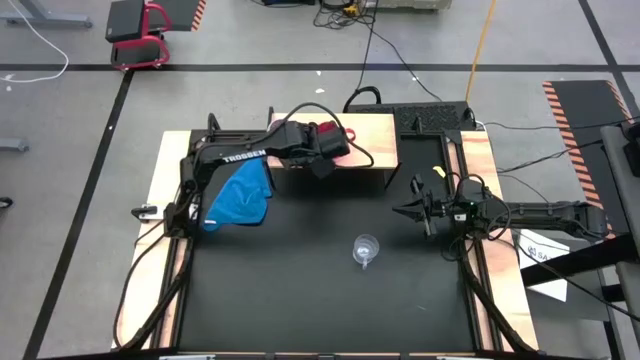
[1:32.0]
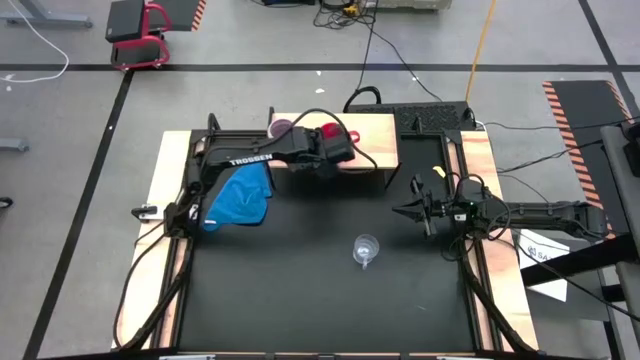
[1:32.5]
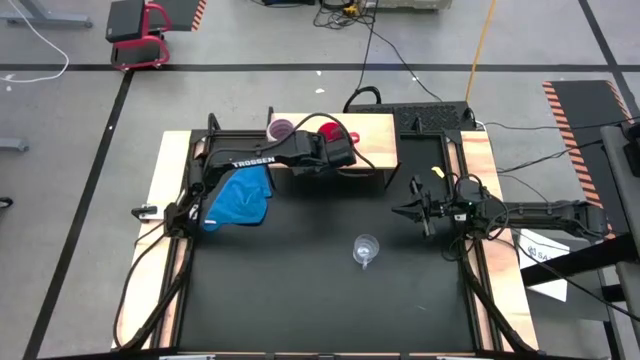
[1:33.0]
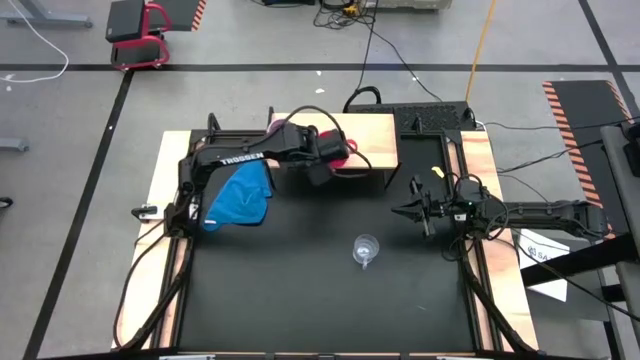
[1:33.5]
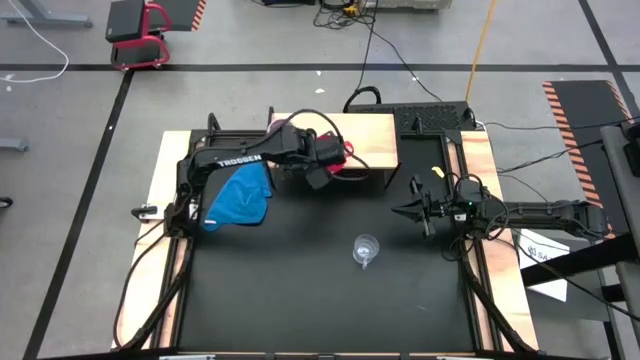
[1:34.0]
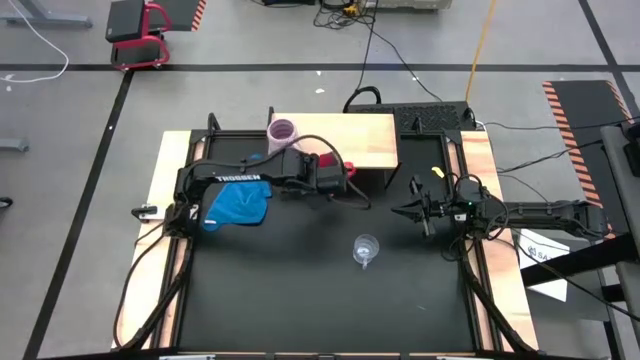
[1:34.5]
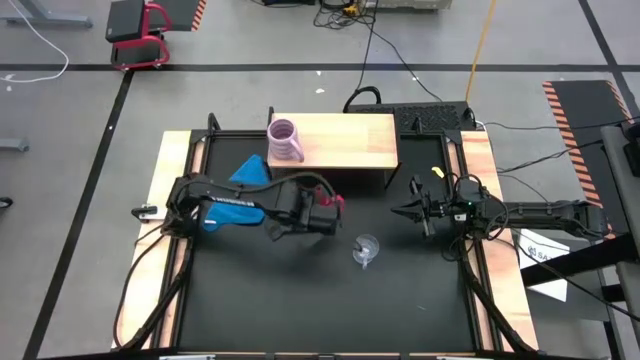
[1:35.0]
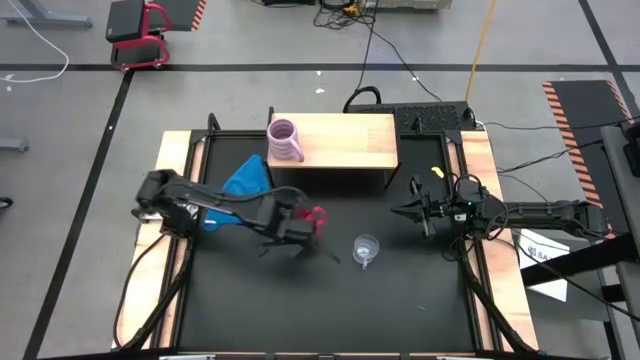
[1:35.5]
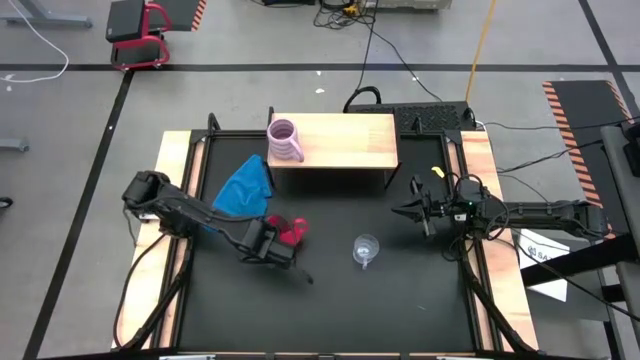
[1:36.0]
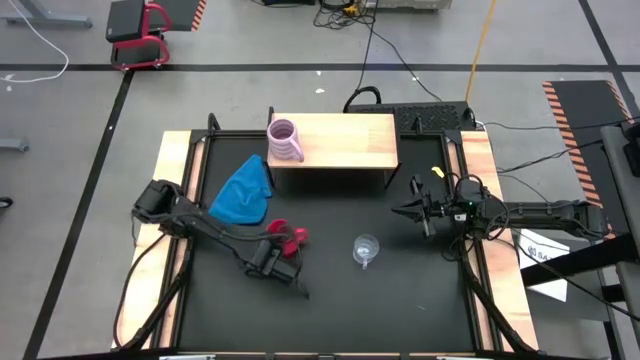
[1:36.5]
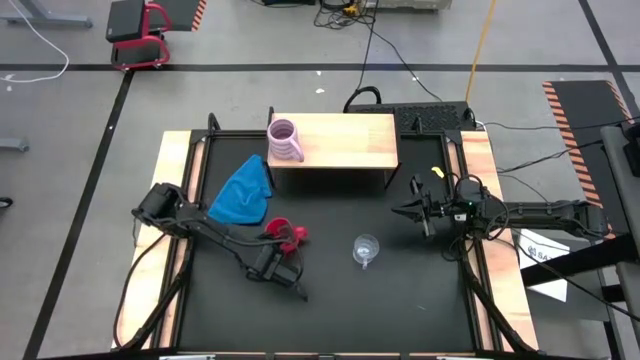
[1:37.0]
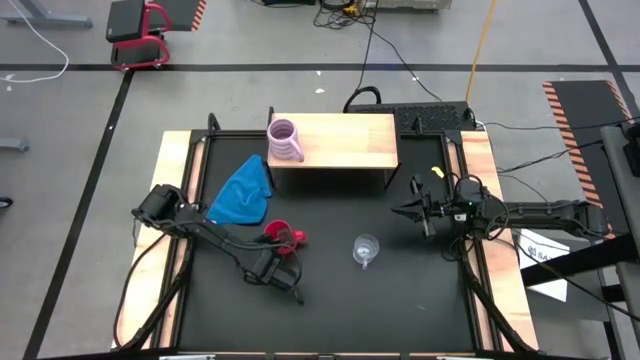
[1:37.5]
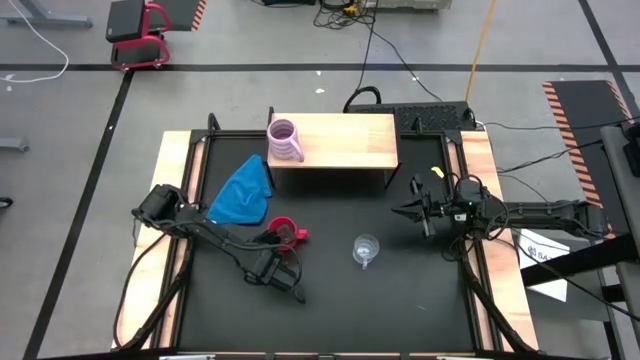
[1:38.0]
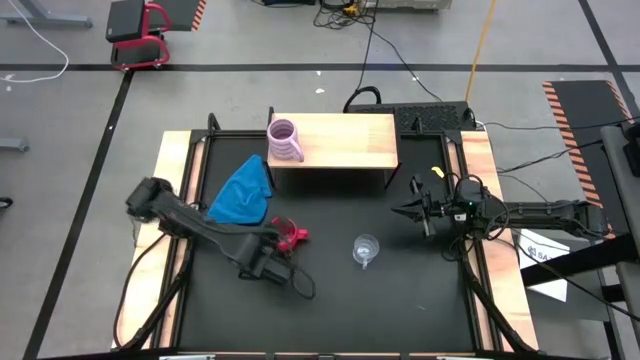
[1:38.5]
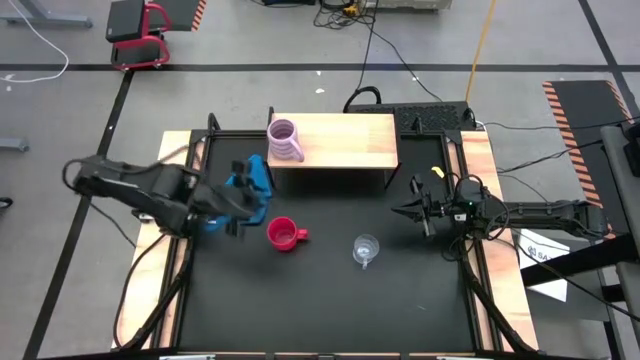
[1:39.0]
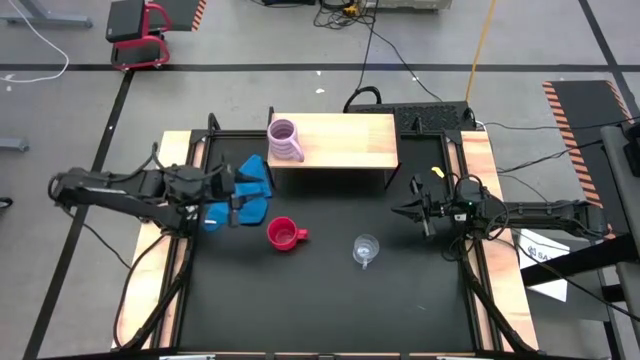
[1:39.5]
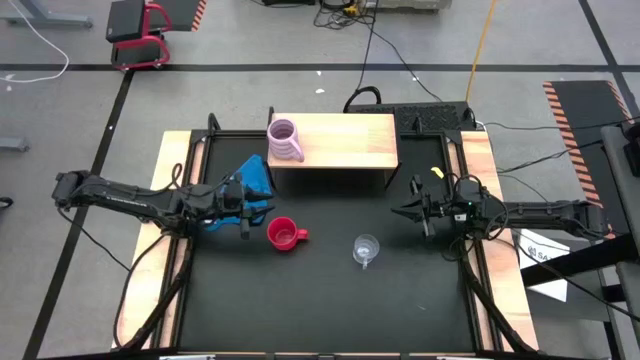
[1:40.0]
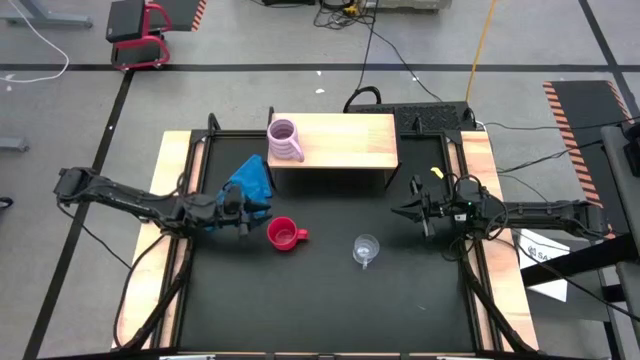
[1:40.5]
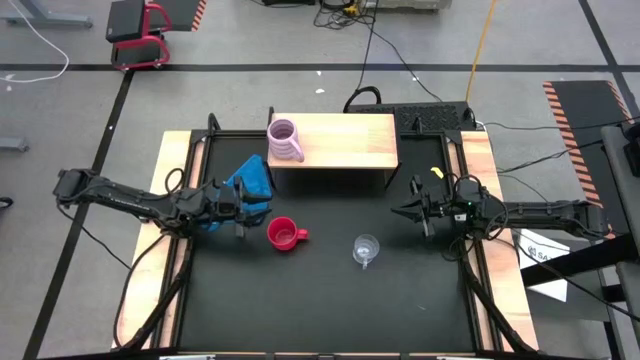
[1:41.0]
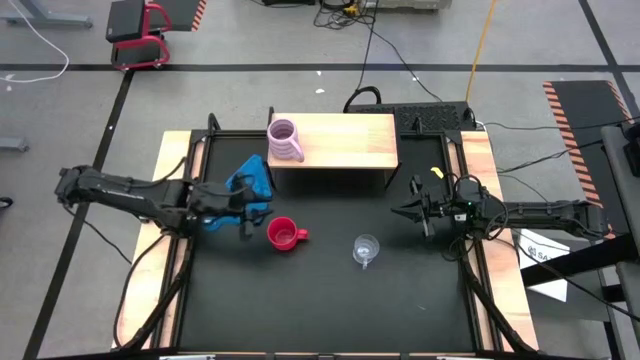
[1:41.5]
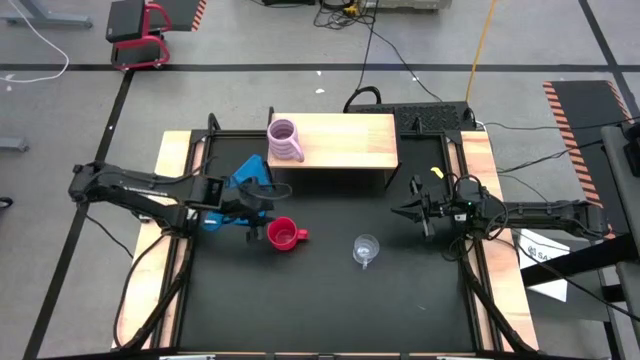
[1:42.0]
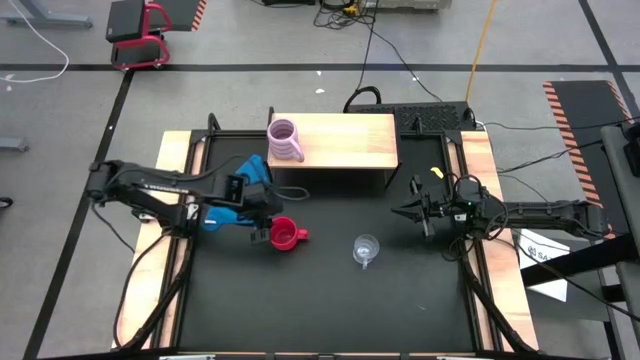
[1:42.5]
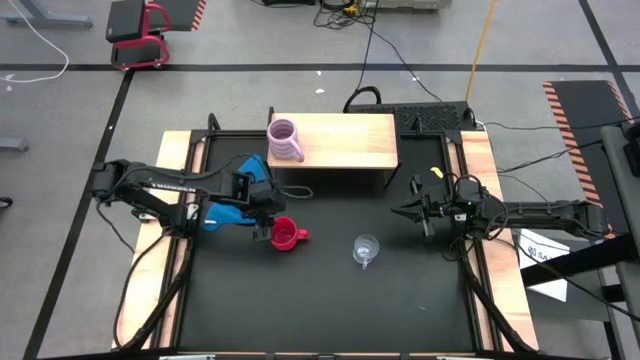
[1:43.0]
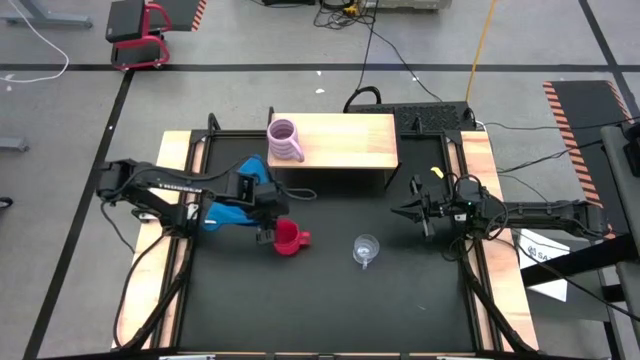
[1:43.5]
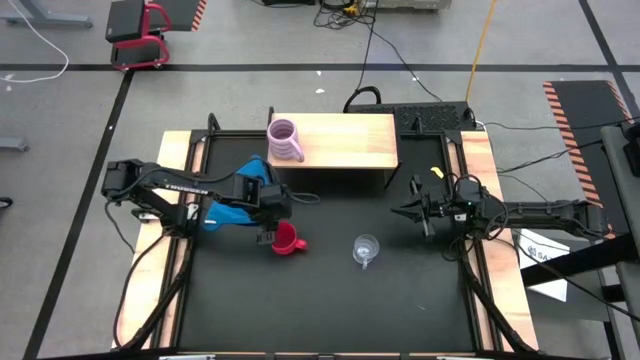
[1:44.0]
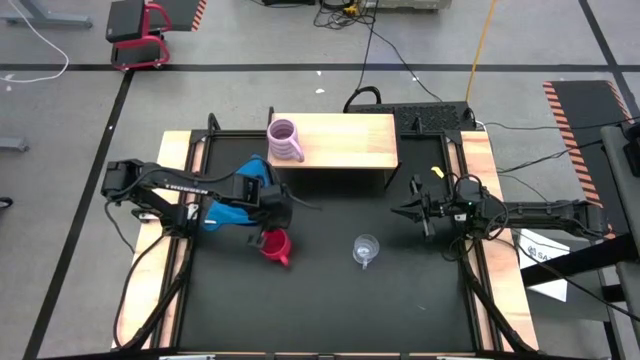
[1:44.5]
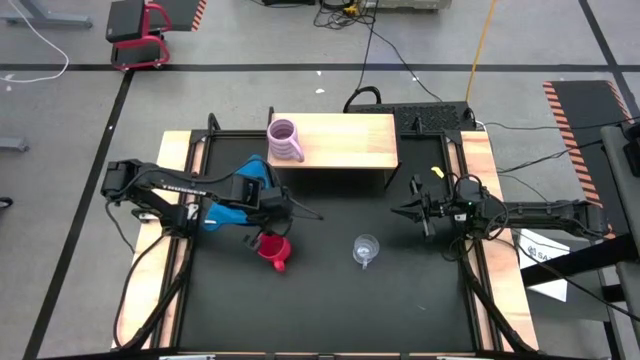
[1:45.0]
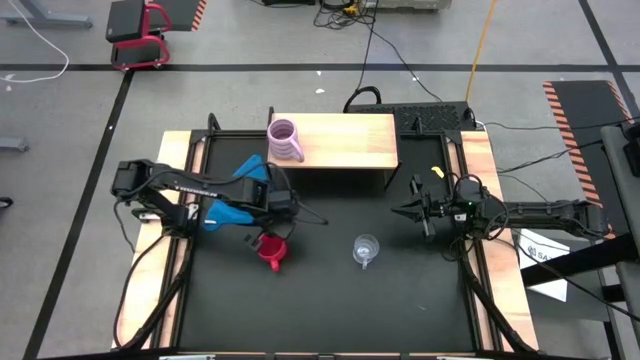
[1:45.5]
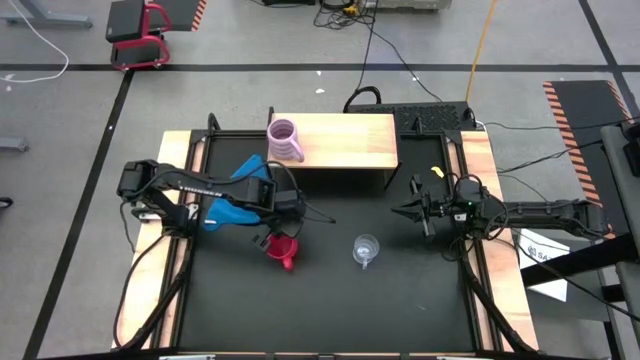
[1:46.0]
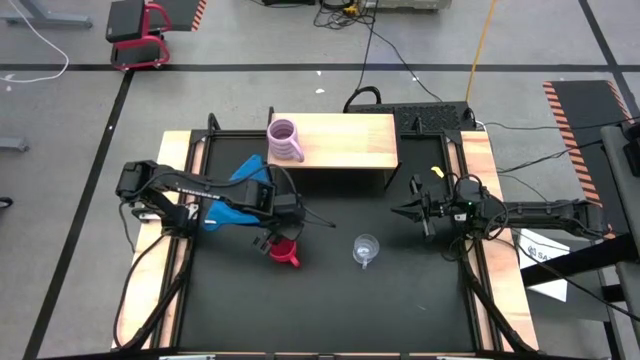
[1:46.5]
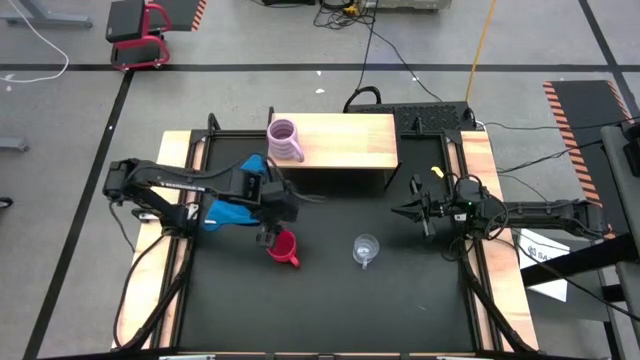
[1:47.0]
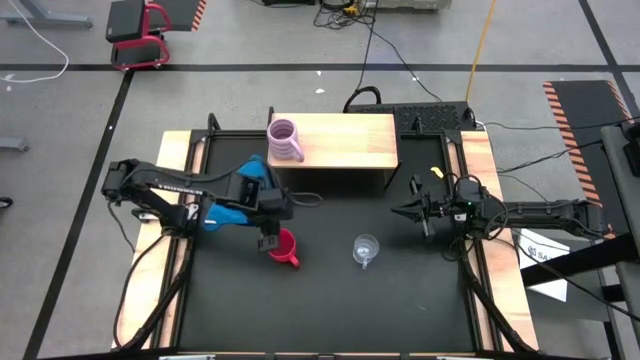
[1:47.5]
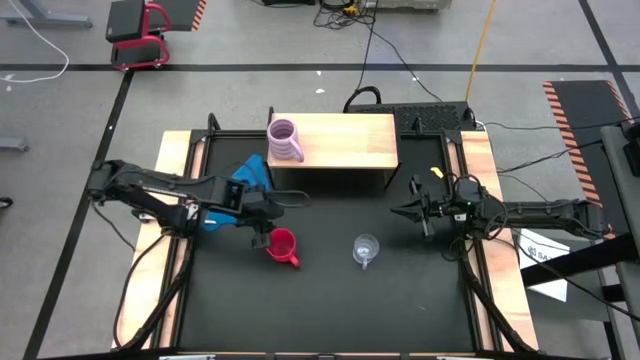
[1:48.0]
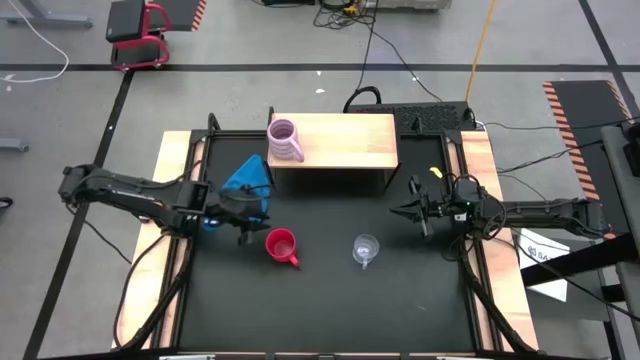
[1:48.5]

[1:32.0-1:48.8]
Task: Stack small to large cups/mugs on shelf
Put the red mug on the shelf

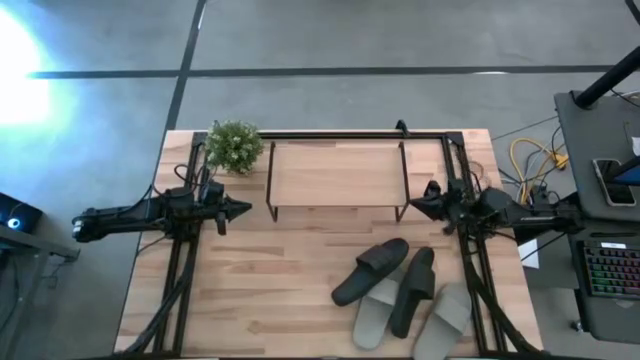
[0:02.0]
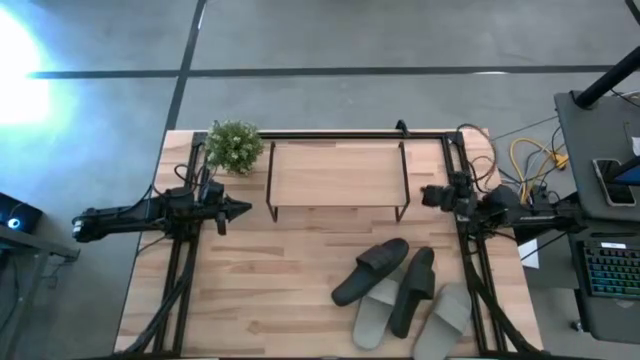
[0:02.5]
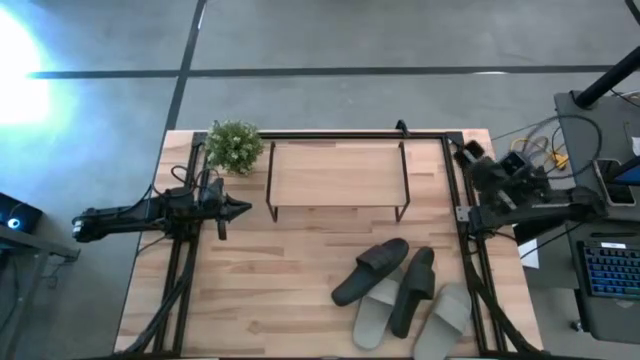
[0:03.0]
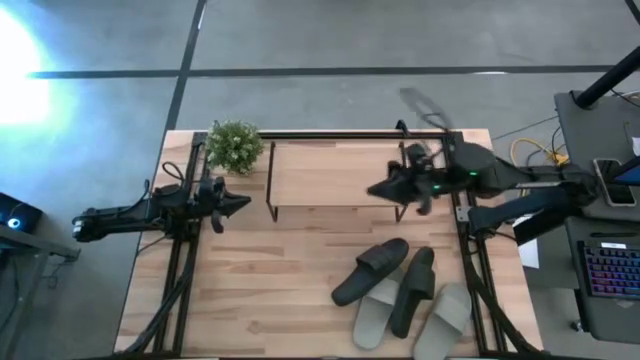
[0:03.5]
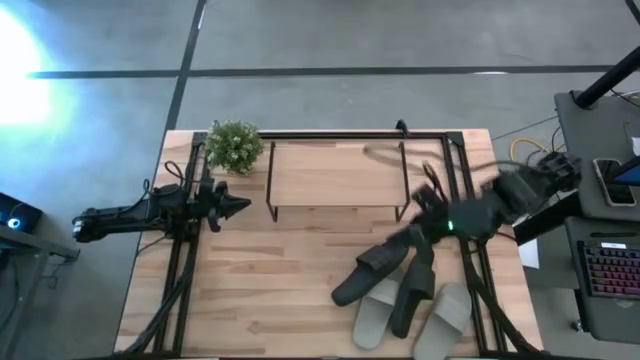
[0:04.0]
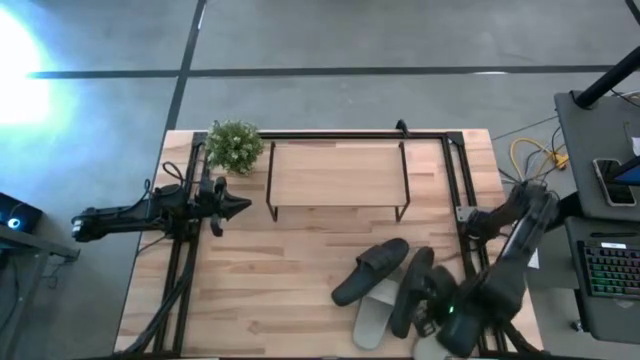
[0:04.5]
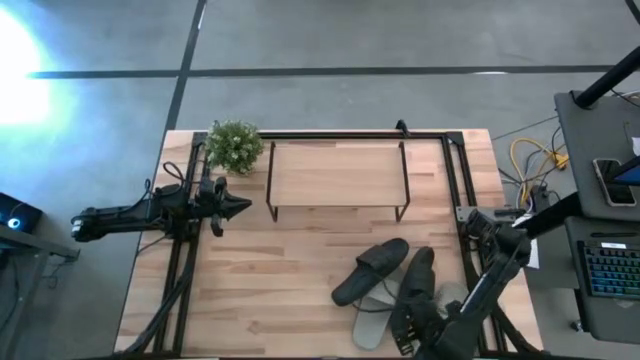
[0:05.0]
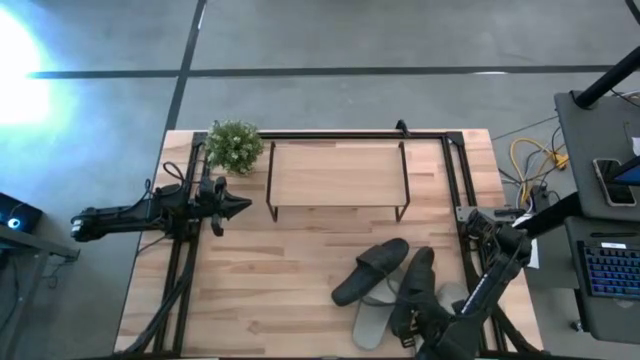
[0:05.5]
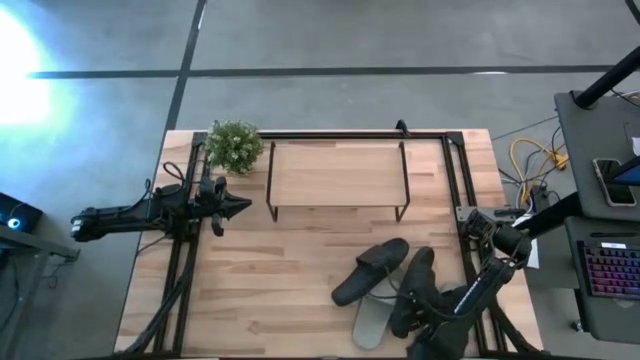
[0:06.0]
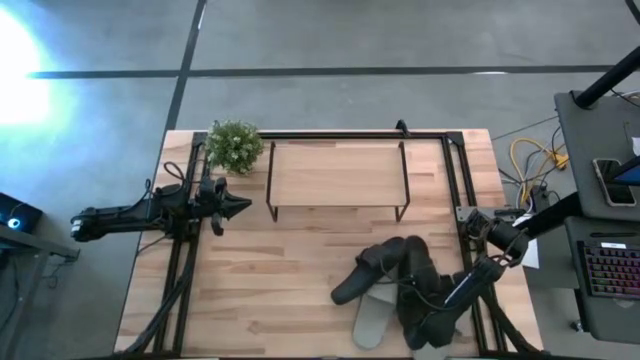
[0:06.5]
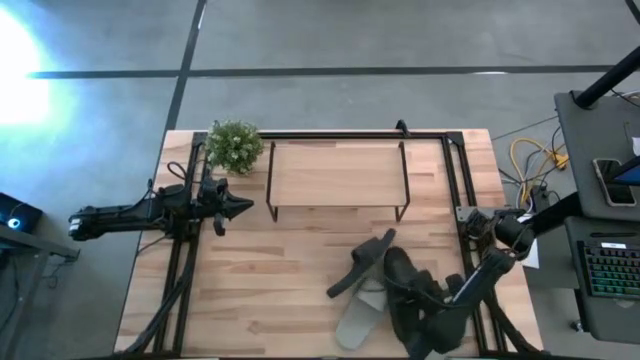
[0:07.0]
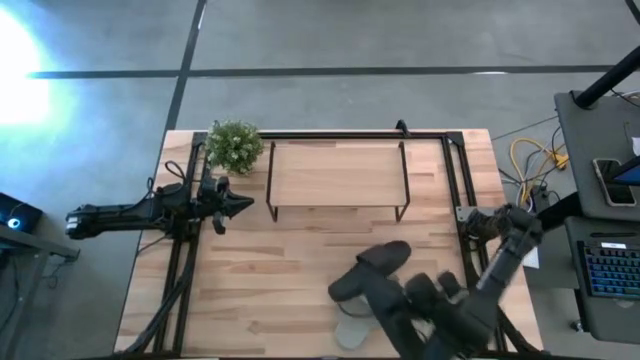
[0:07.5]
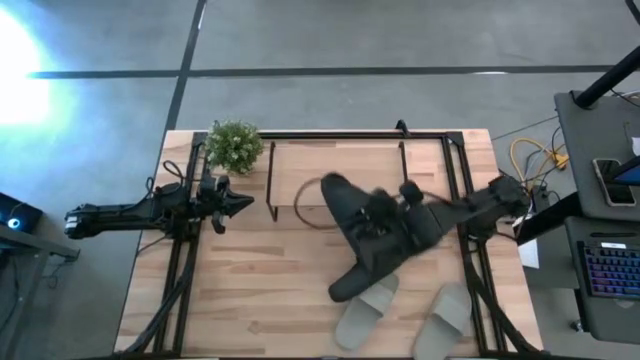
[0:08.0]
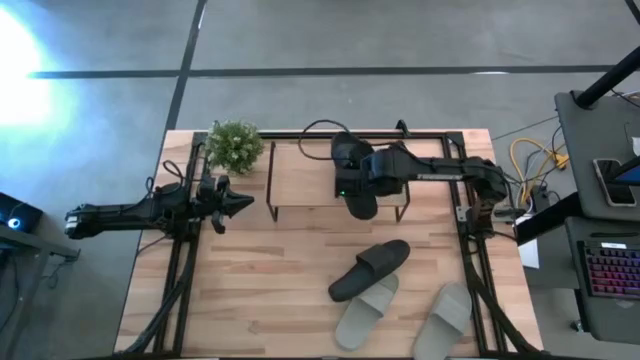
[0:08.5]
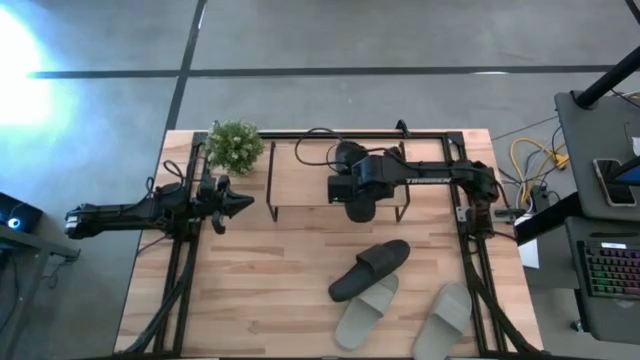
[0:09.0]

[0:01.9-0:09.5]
Task: Pick and place slides into the shelf
Put the right black slide on the shelf
